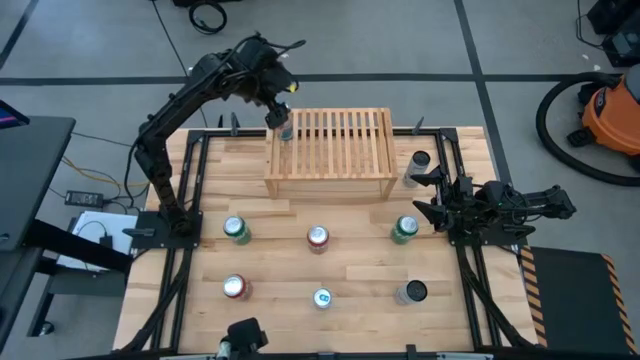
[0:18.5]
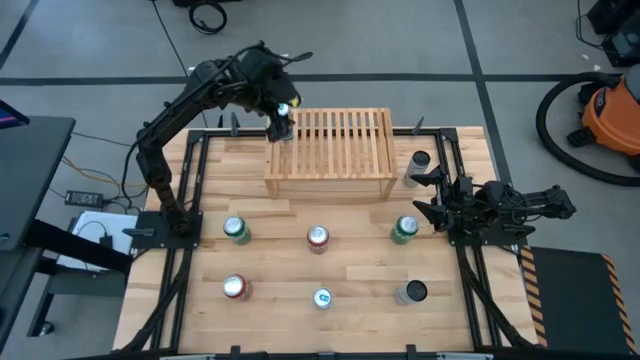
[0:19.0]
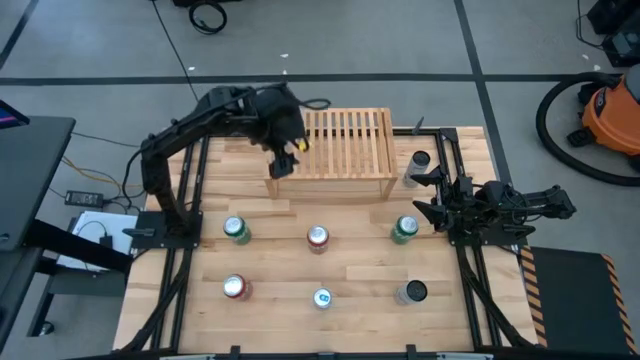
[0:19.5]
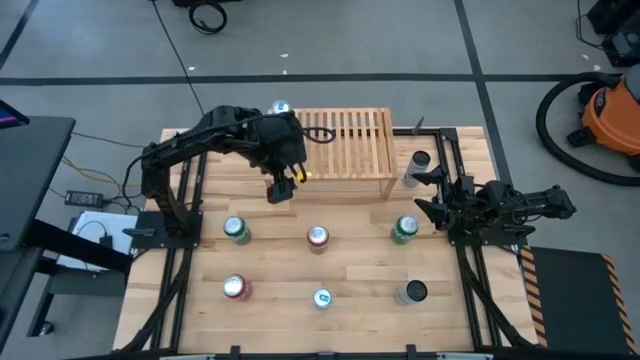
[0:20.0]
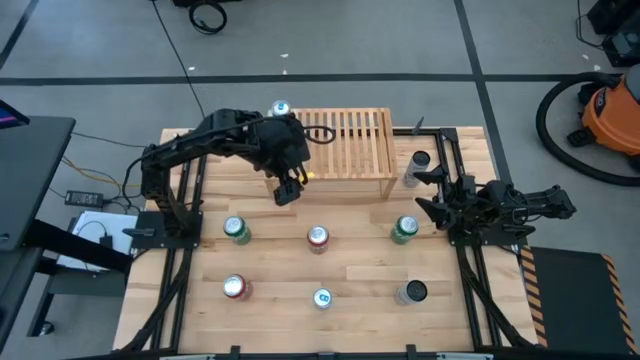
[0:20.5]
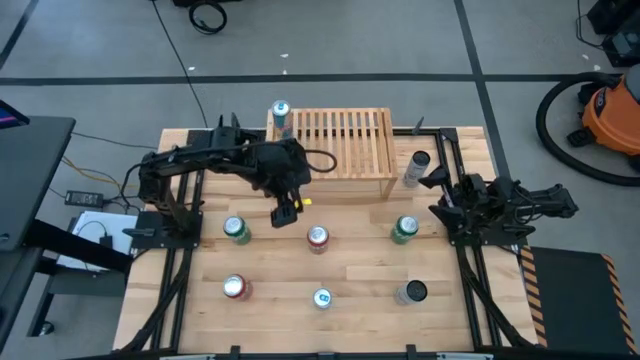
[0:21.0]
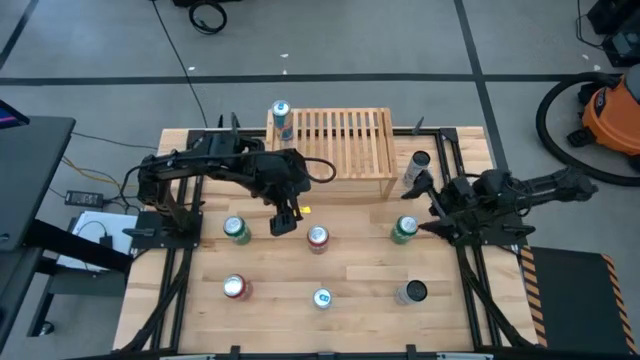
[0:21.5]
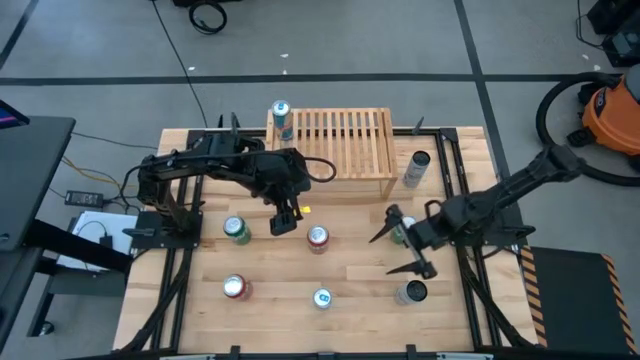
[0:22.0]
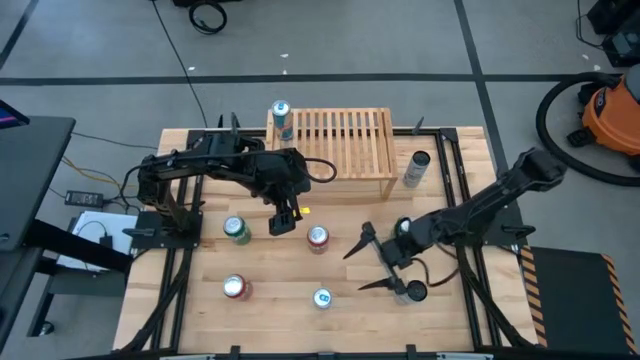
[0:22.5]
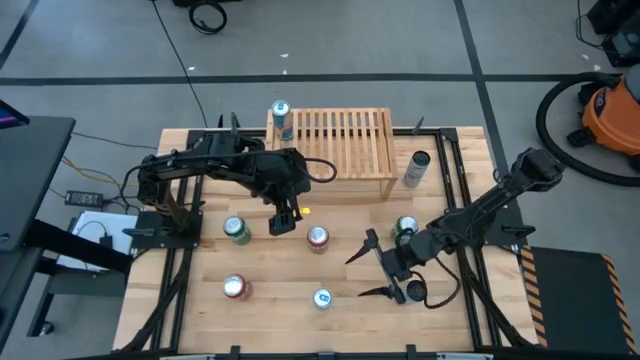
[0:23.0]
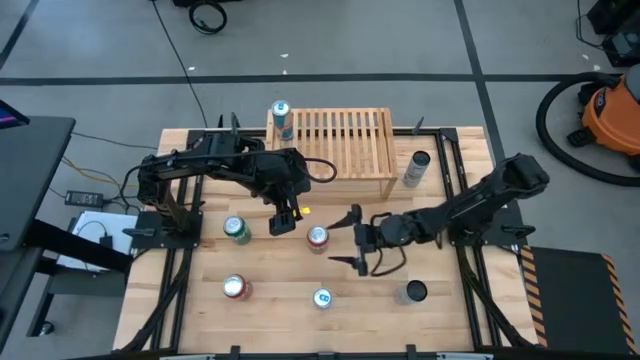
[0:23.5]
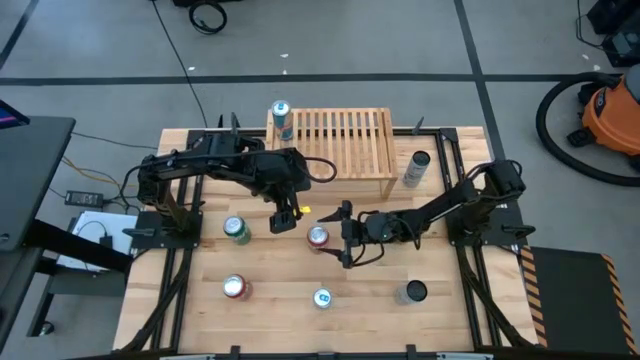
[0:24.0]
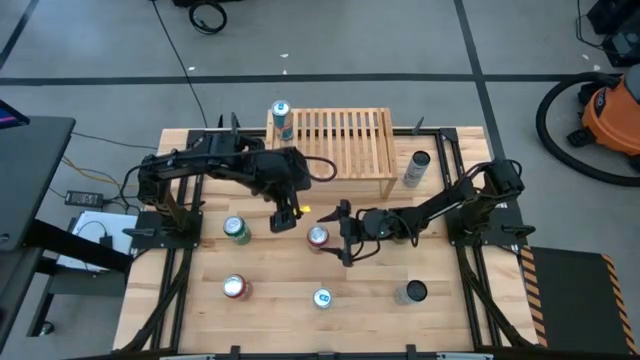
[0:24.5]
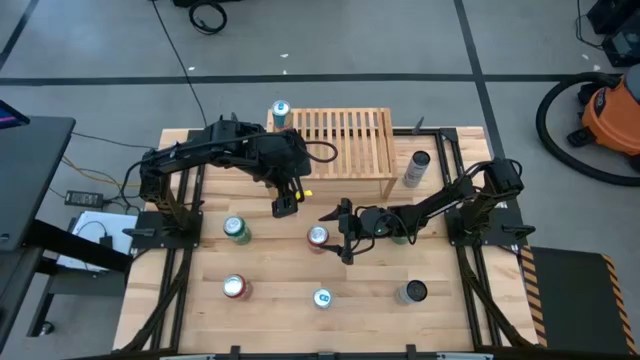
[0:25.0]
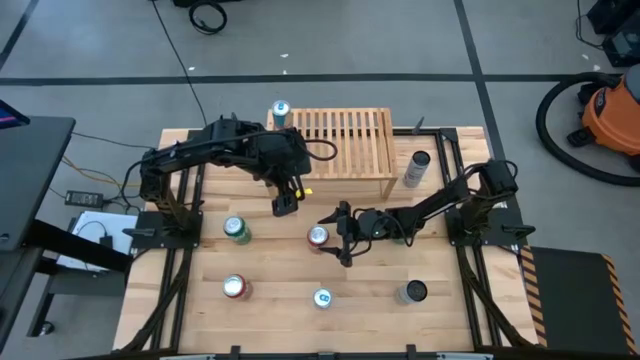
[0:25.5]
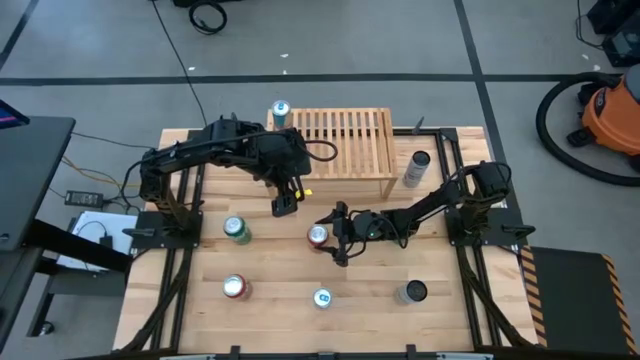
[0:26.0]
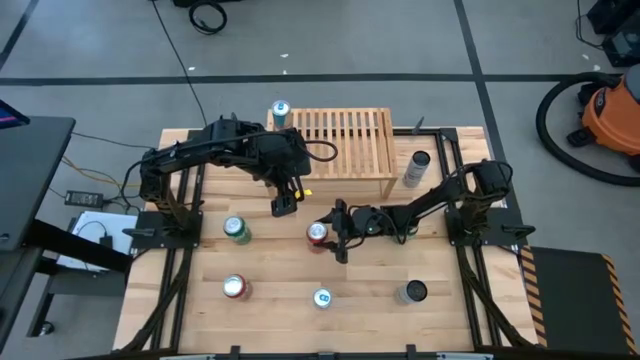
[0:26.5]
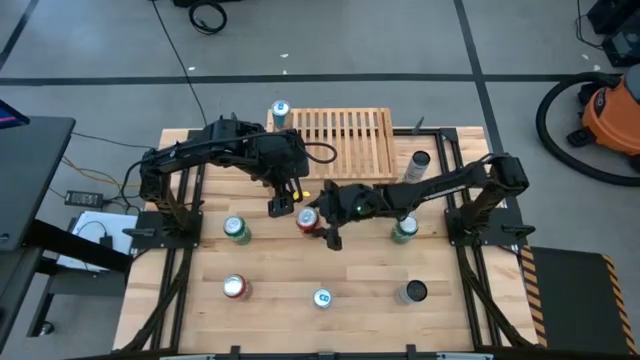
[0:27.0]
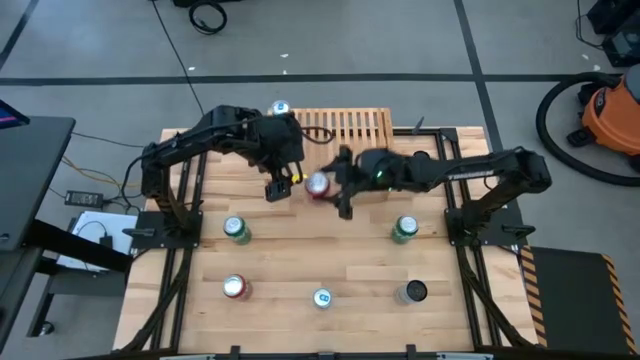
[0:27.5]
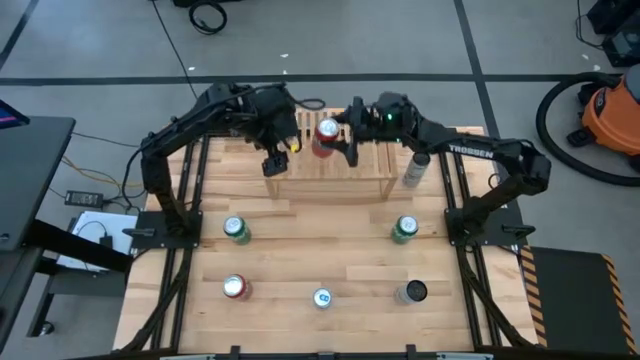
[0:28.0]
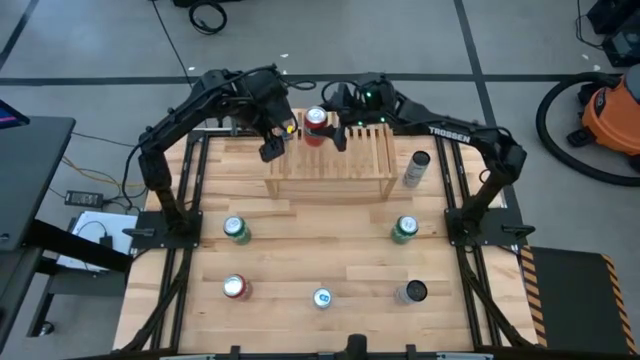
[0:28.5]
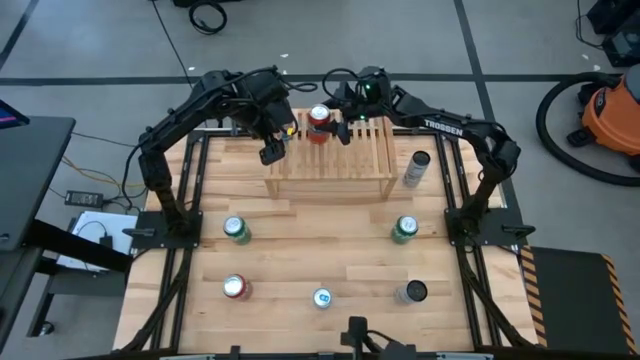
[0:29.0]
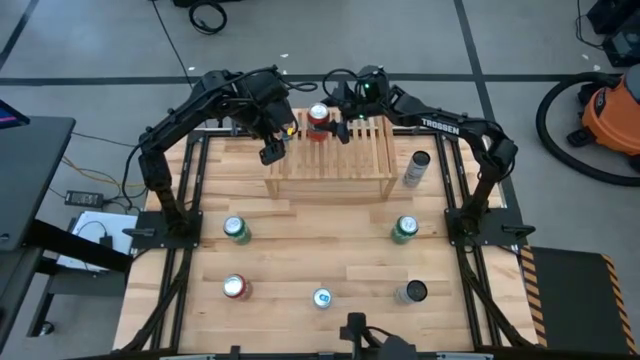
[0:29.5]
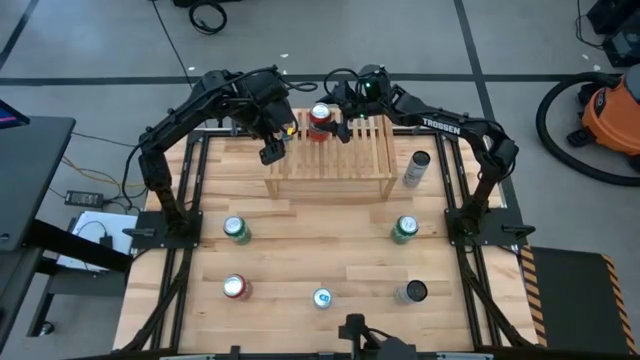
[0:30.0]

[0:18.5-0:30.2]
Task: Place canned beverage on shelf
Put the top red soda can on the shelf

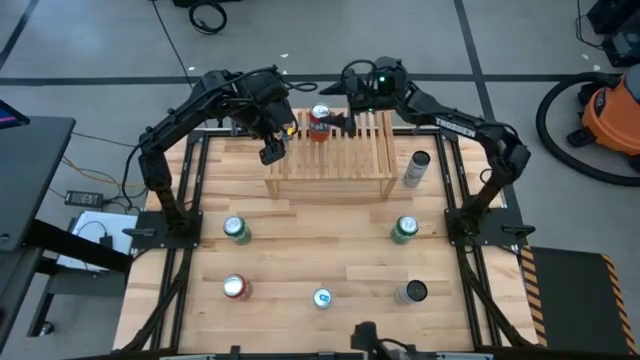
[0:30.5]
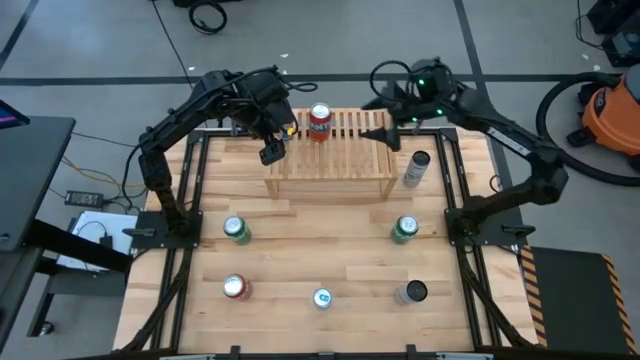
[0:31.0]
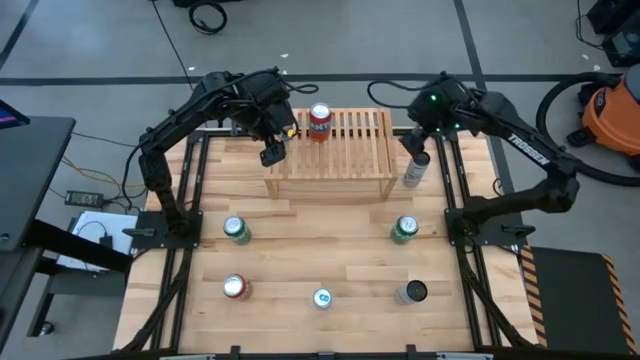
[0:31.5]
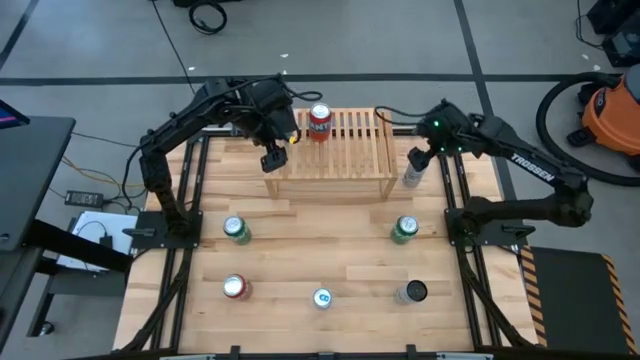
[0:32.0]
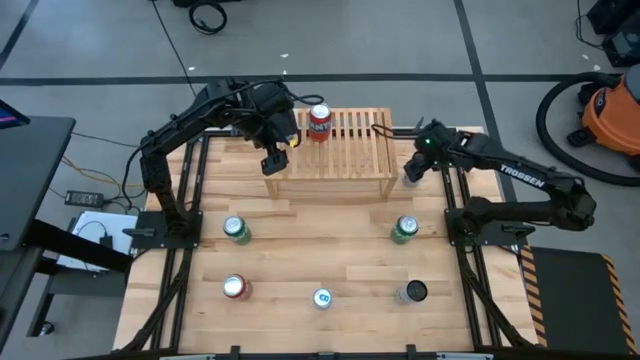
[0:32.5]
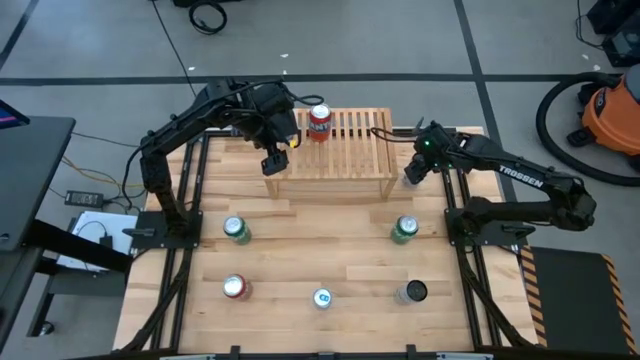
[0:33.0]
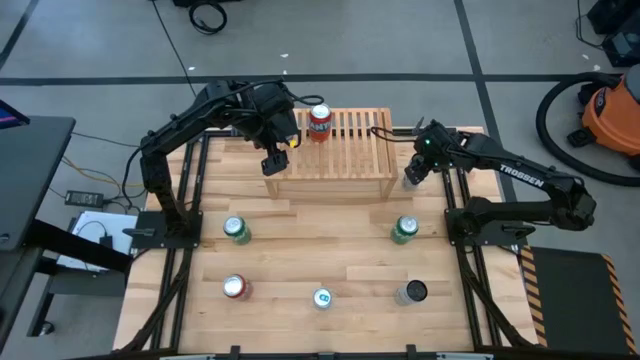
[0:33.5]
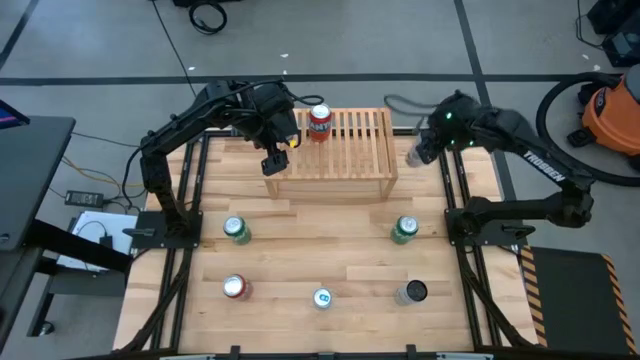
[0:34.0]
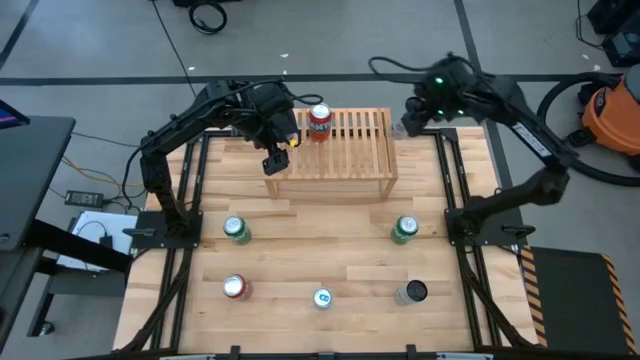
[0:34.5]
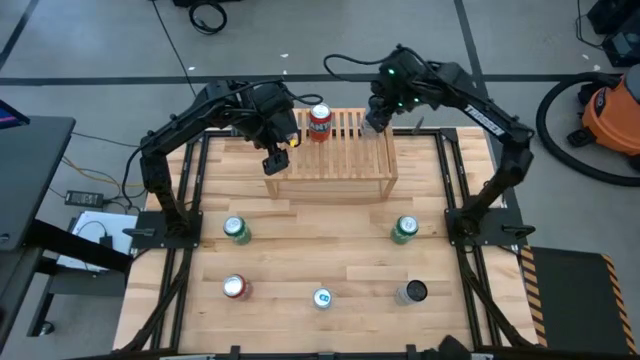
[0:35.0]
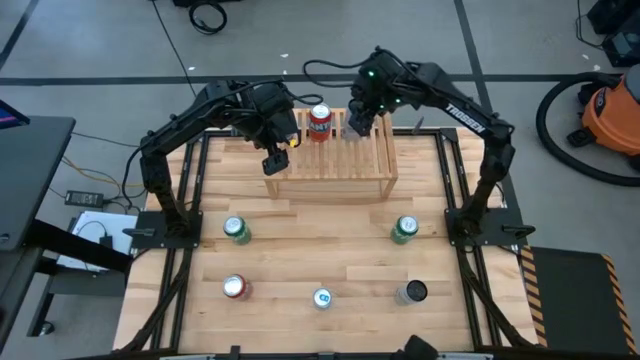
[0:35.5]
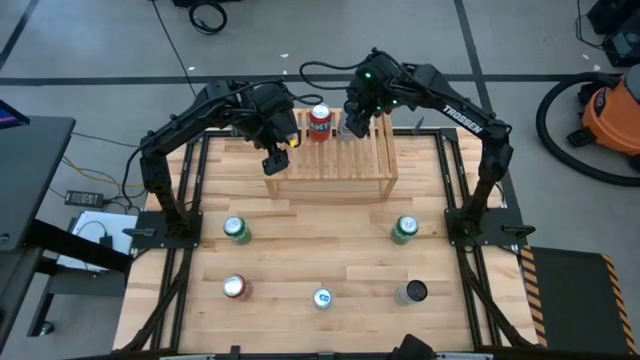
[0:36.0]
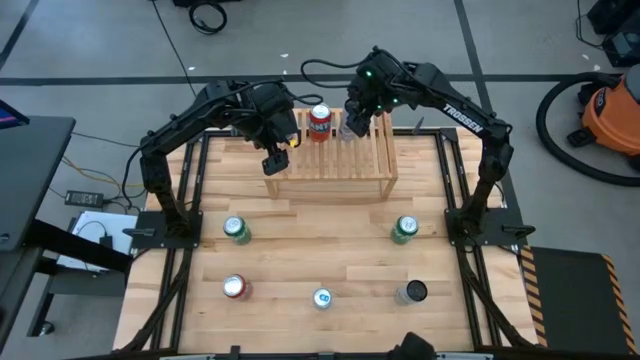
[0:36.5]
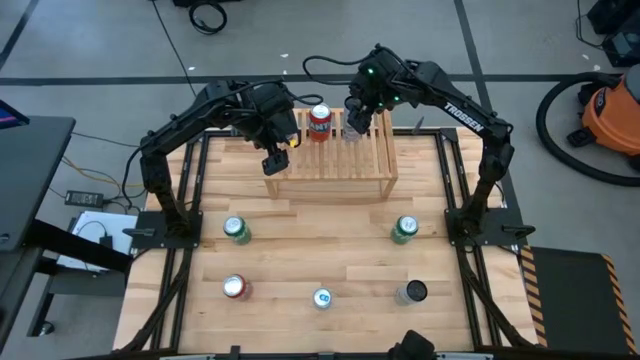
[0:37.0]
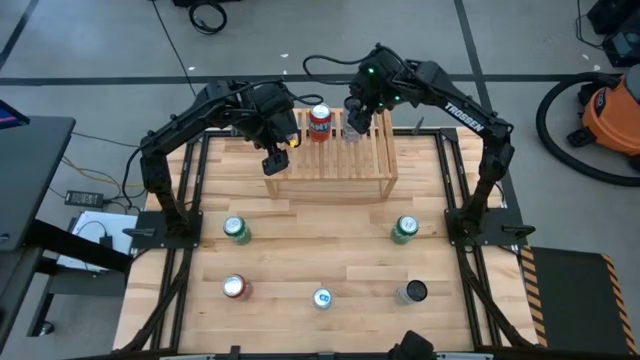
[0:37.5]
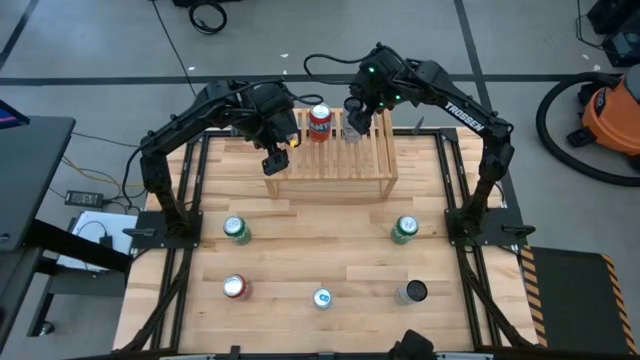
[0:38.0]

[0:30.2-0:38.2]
Put the top white-blue soda can on the shelf

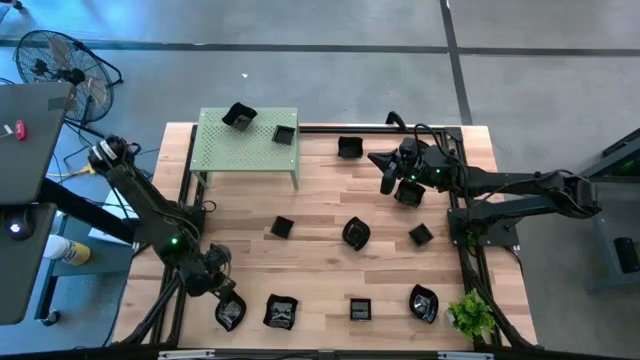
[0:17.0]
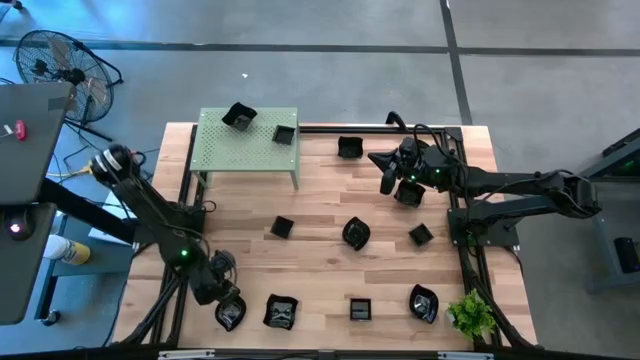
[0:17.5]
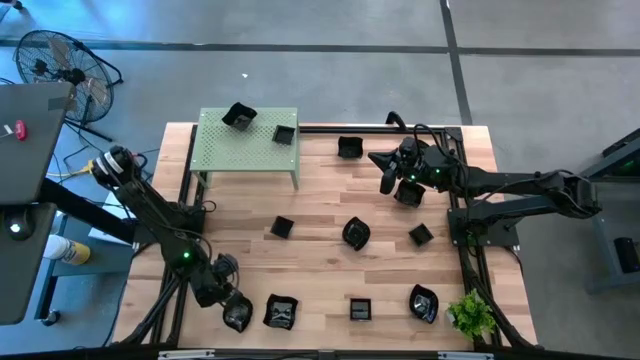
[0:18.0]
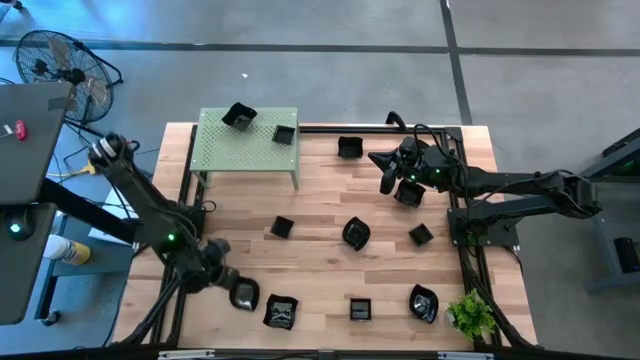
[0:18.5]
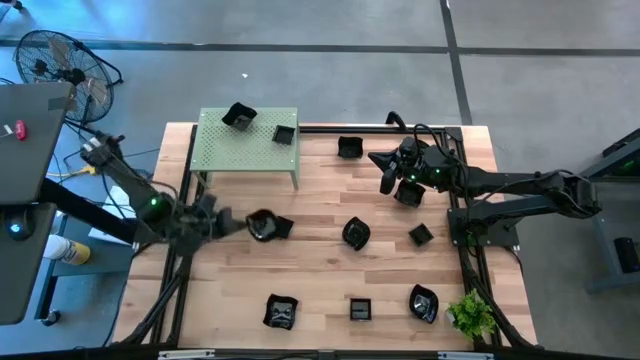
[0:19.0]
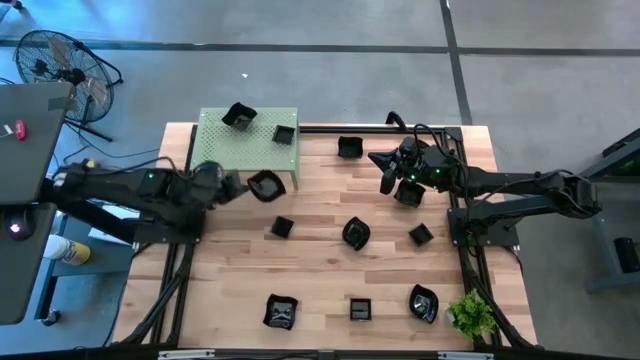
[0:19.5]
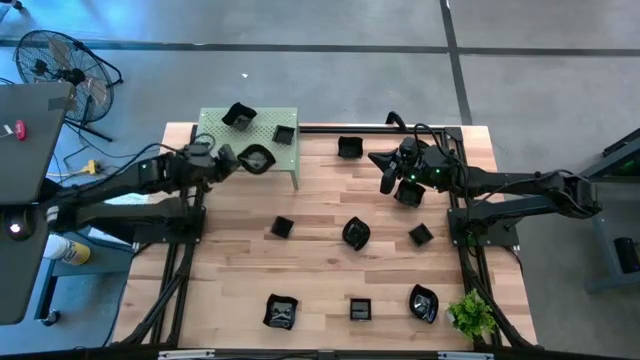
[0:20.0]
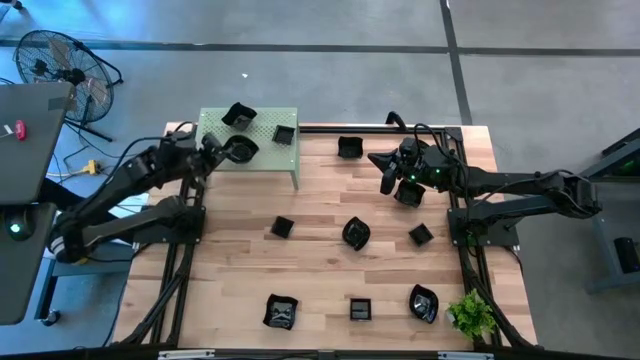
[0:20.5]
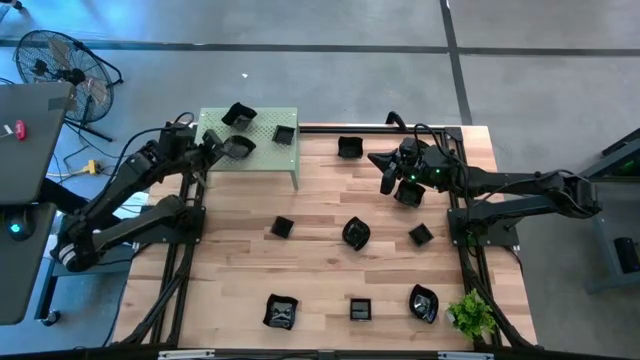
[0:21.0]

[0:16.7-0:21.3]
Task: Pick & Place Mini shaped plates
Put the black leaf-shaped plate on the shelf
